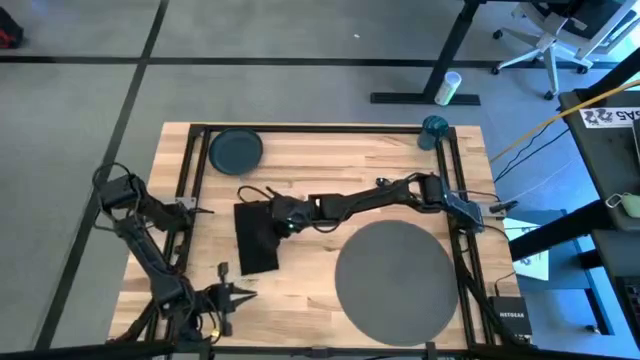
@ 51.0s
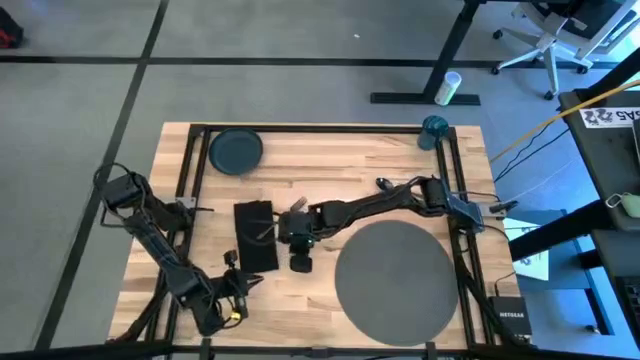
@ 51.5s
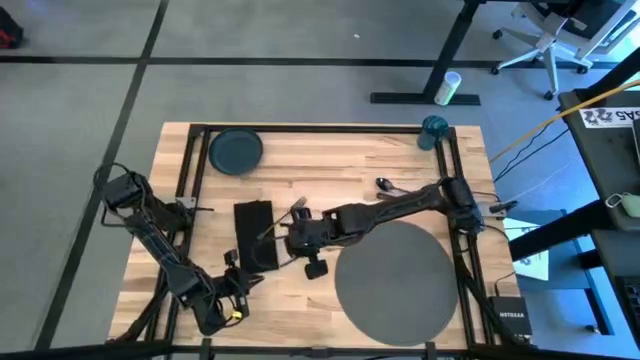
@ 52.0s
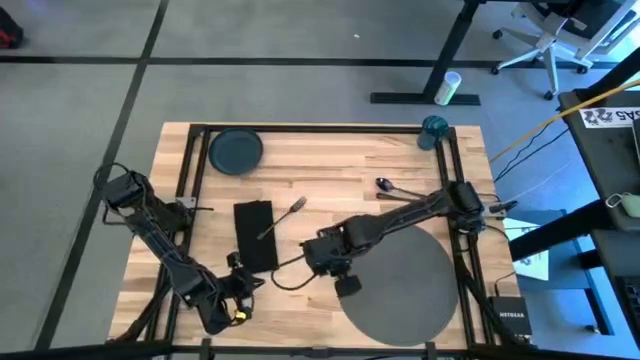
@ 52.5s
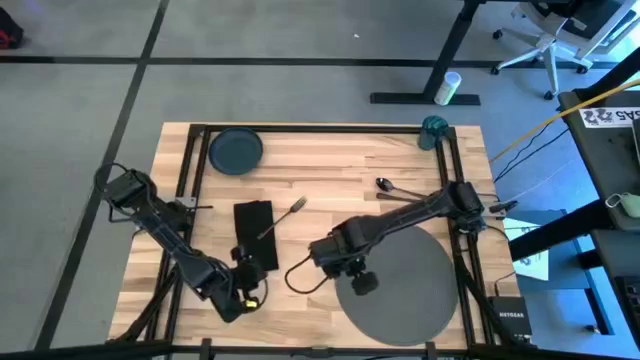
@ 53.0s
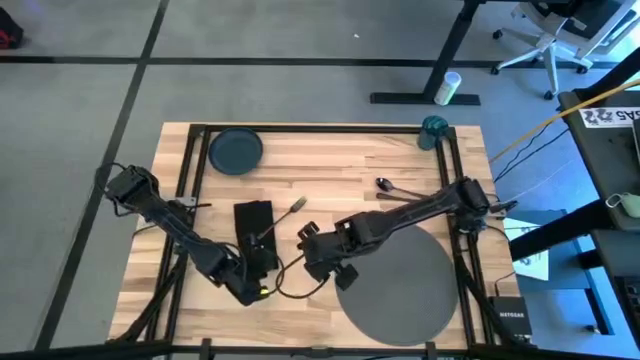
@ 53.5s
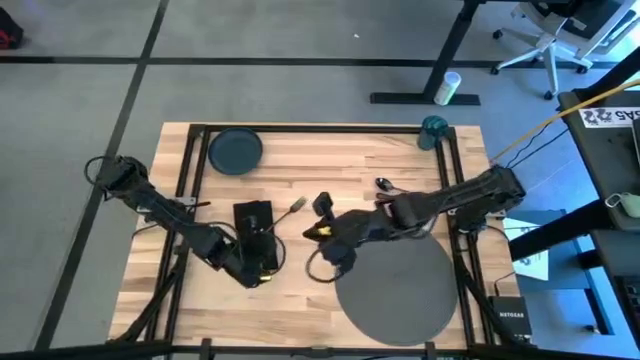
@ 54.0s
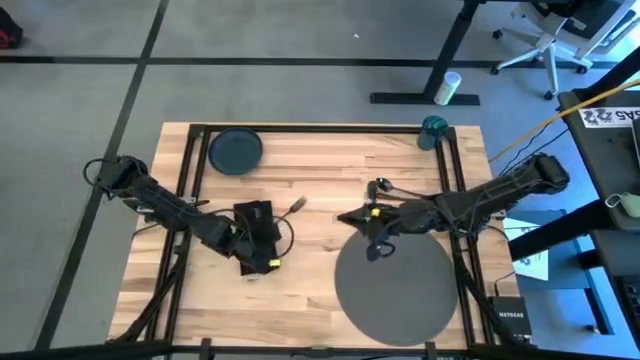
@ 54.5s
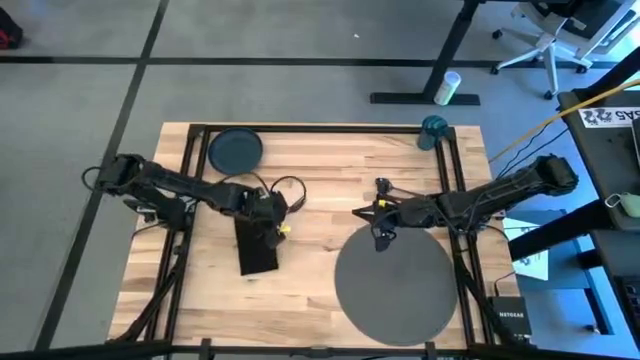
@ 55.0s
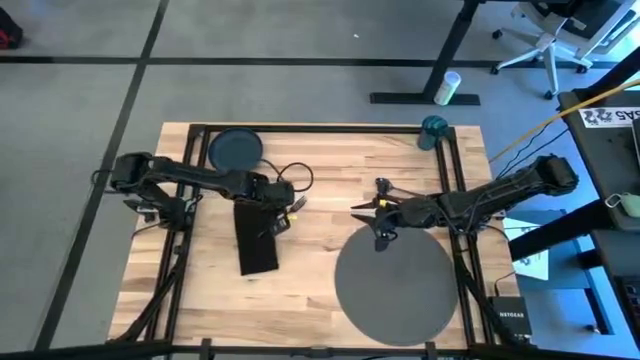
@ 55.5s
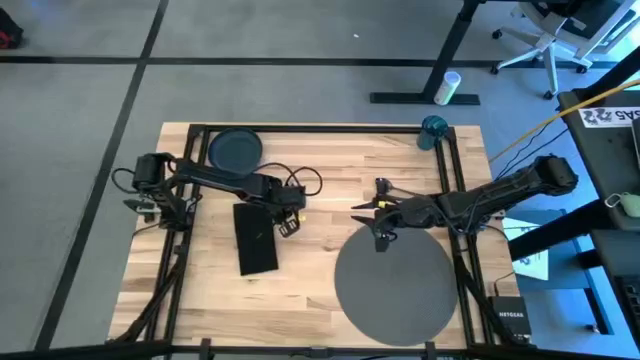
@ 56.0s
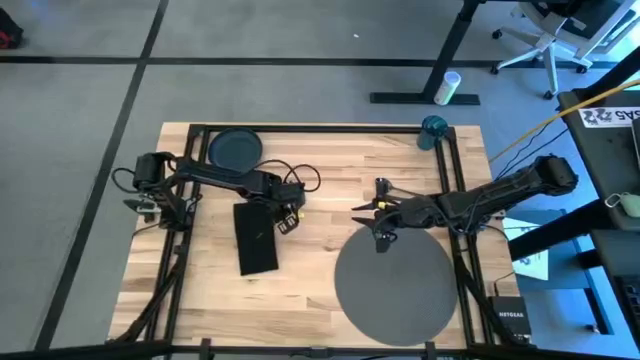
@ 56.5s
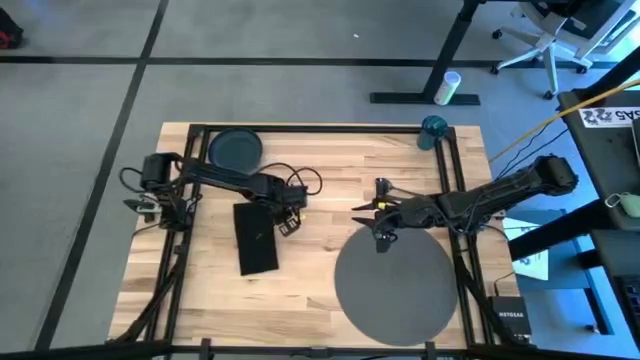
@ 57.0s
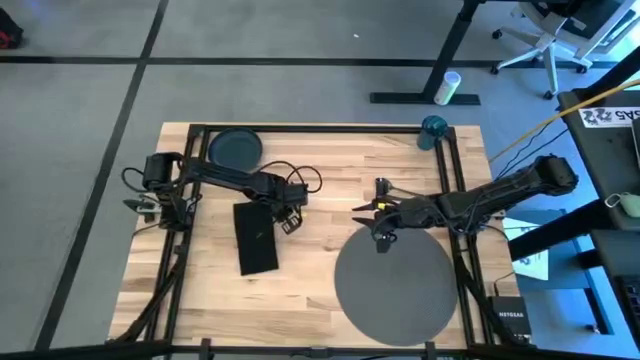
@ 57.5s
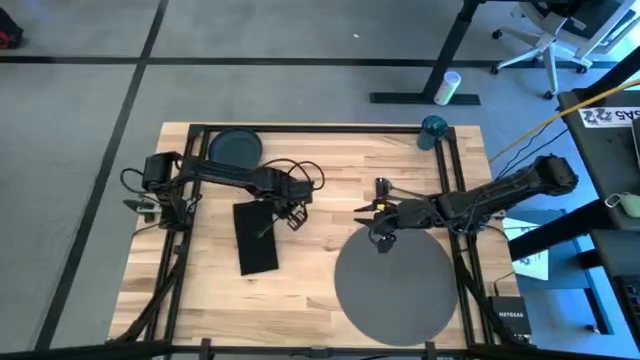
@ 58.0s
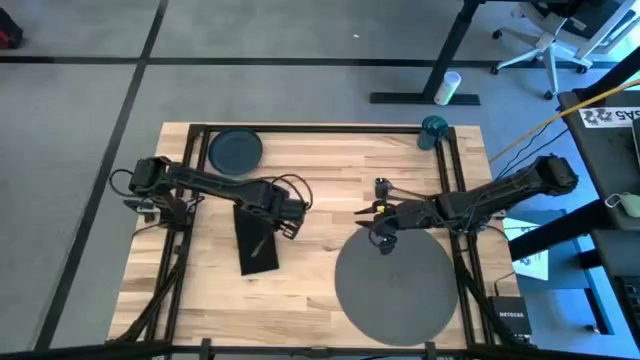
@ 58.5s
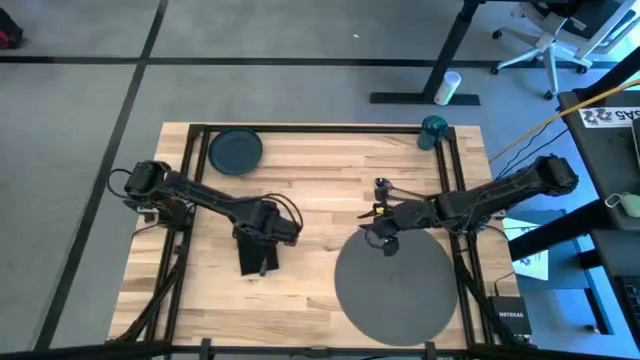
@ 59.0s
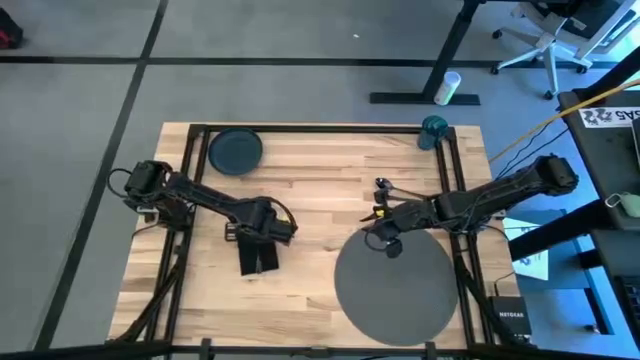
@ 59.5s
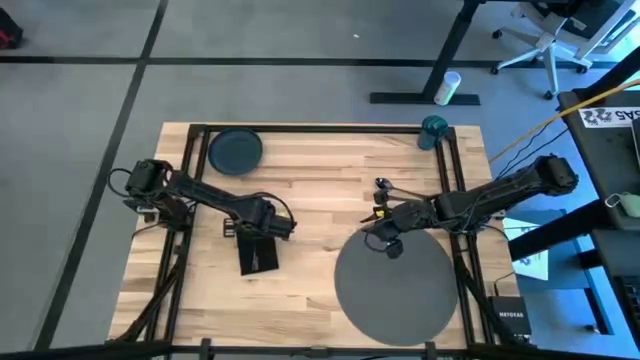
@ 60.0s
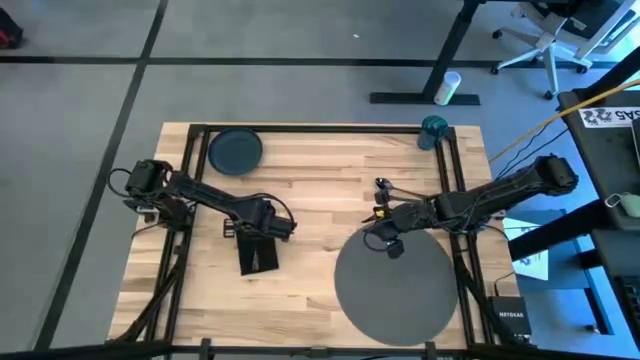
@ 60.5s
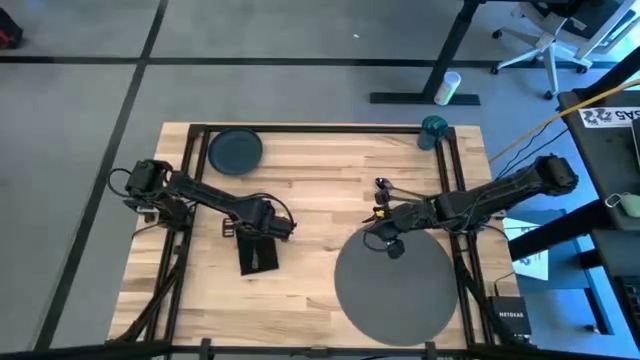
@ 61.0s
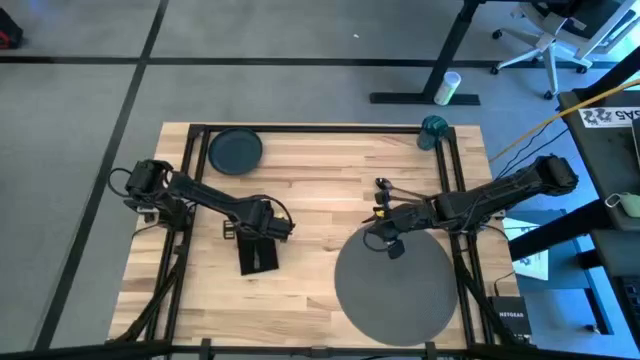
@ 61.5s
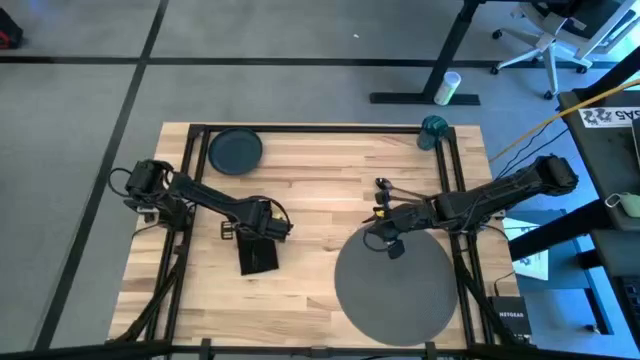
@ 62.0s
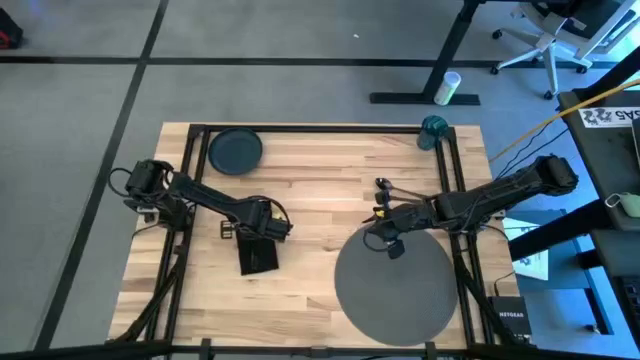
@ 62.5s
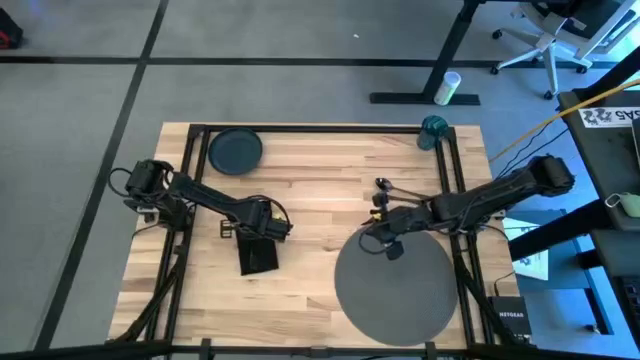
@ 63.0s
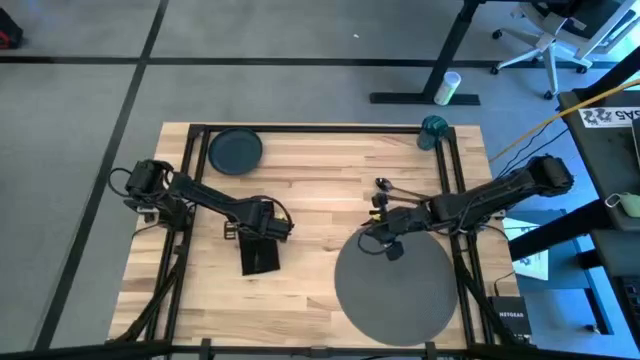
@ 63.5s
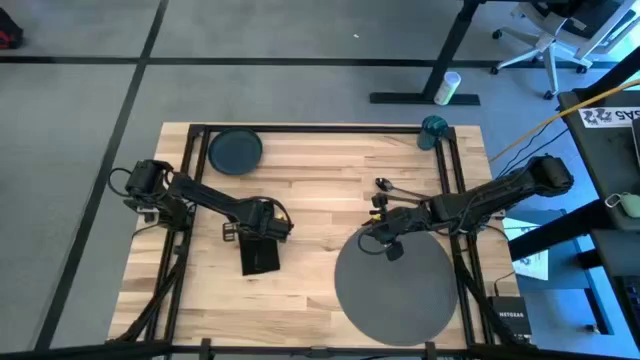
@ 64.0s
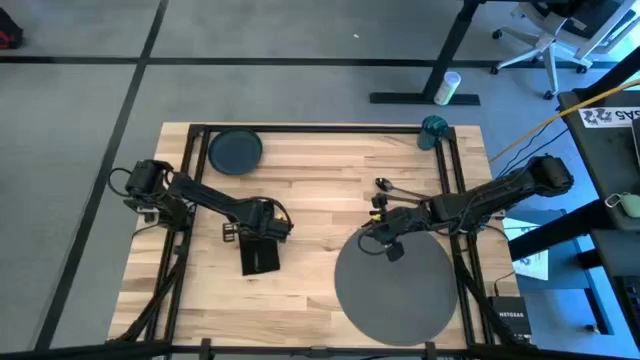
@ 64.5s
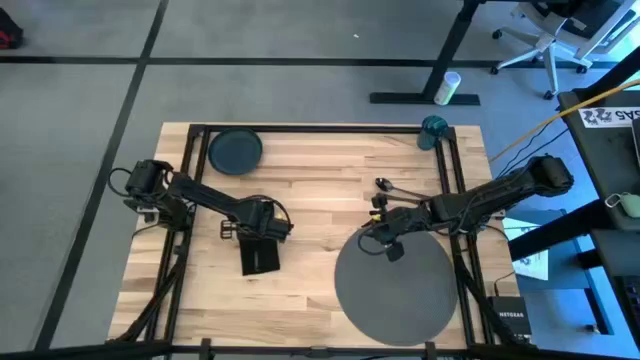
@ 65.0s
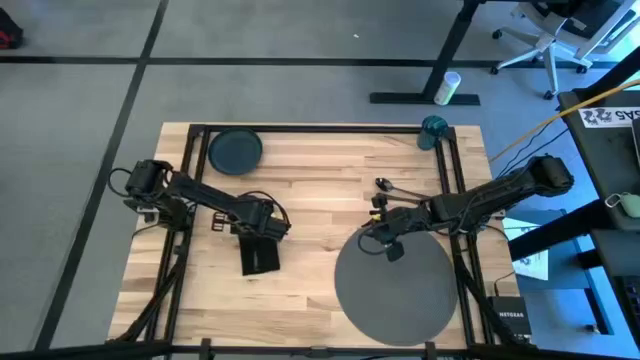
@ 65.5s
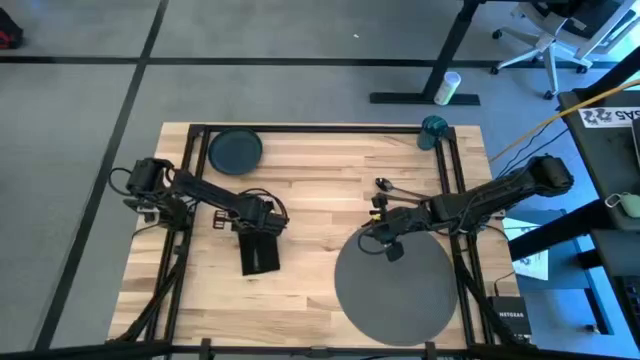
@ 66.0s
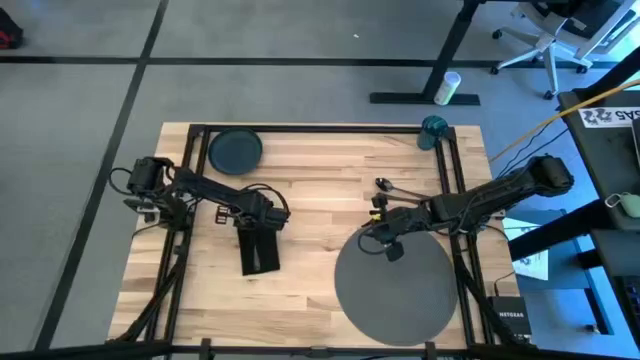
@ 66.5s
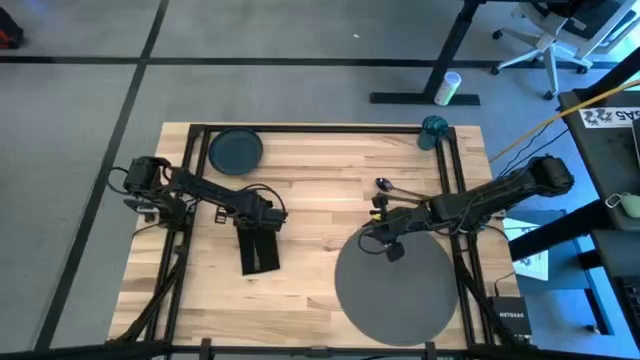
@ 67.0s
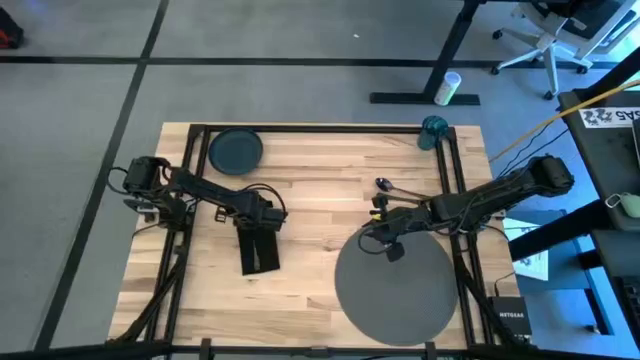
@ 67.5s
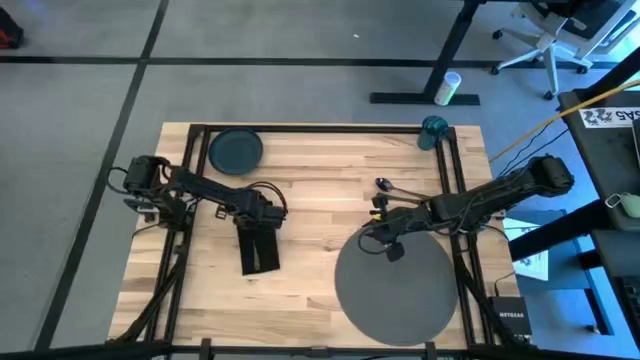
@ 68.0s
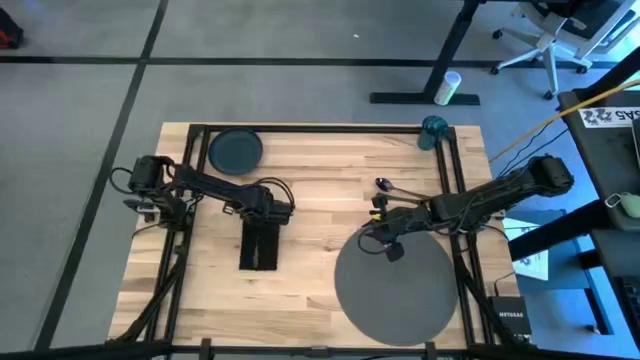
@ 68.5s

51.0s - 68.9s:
Task: Set table place
Put the black fork on the black table napkin
